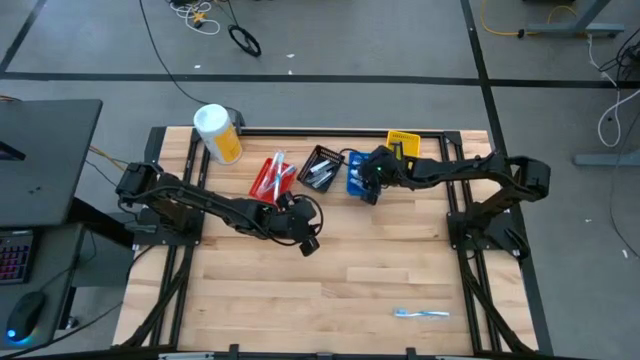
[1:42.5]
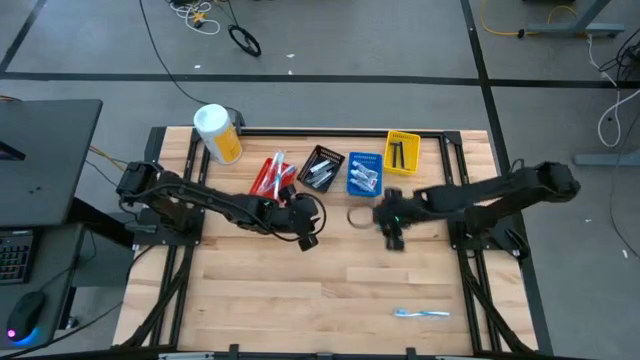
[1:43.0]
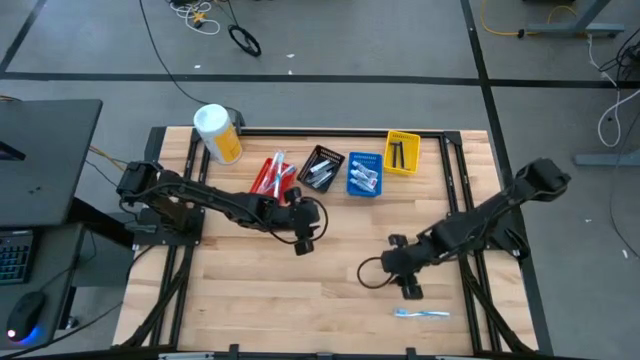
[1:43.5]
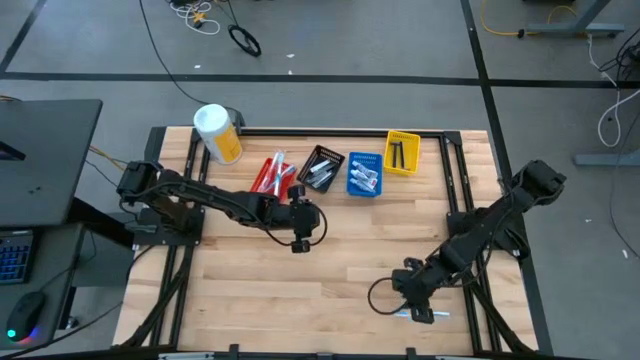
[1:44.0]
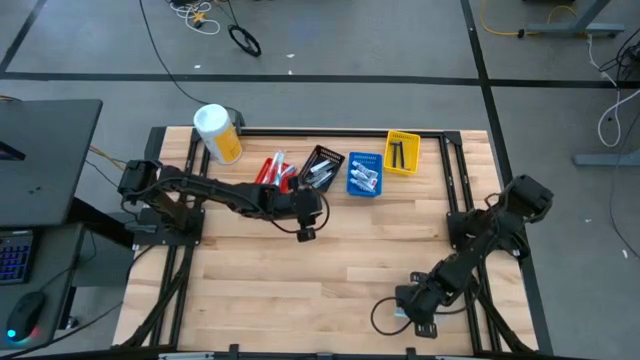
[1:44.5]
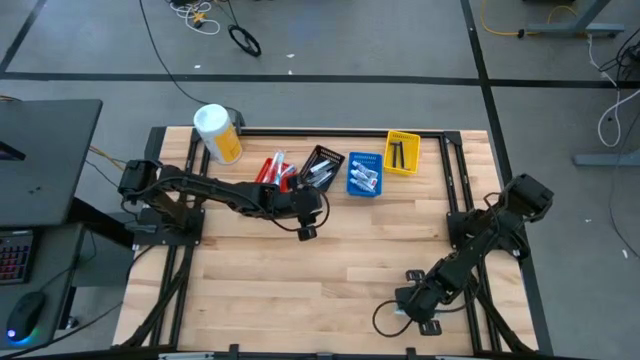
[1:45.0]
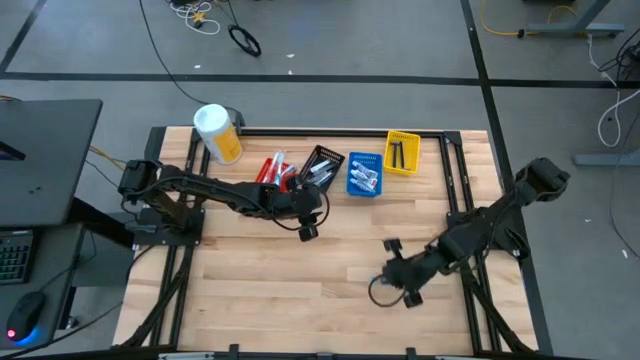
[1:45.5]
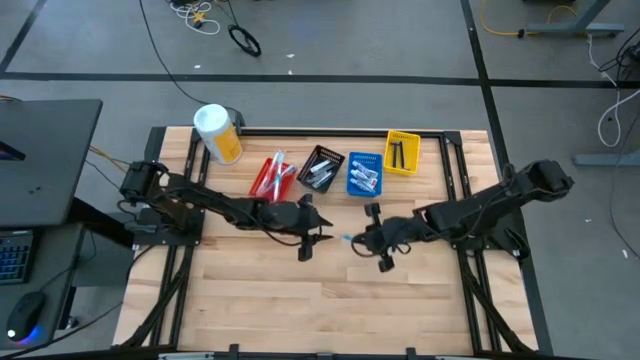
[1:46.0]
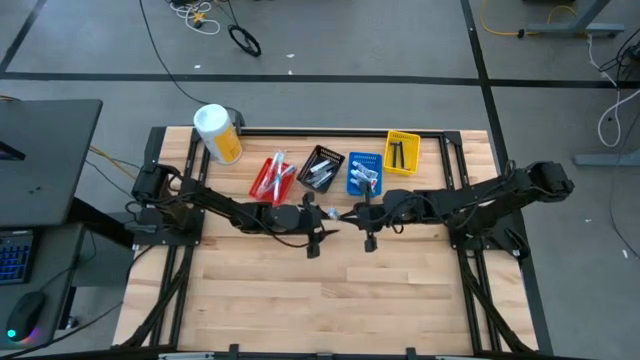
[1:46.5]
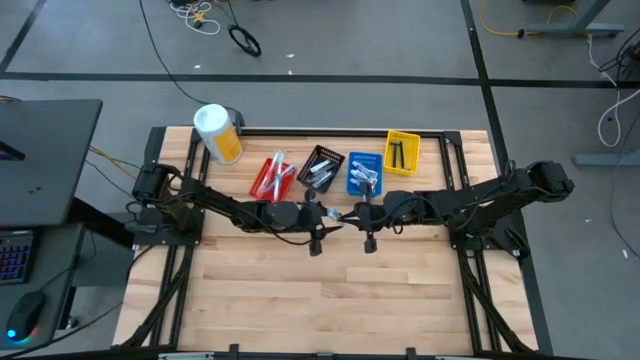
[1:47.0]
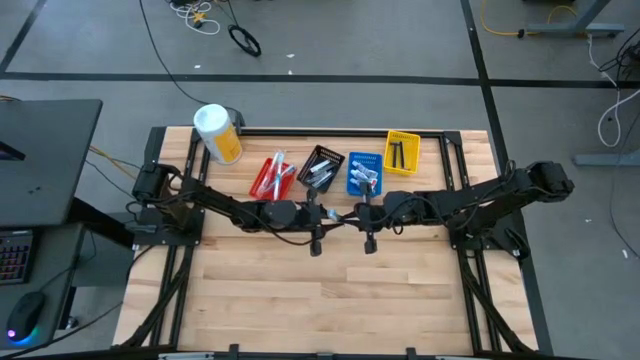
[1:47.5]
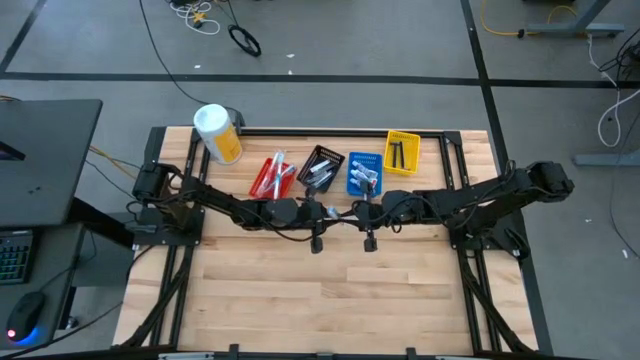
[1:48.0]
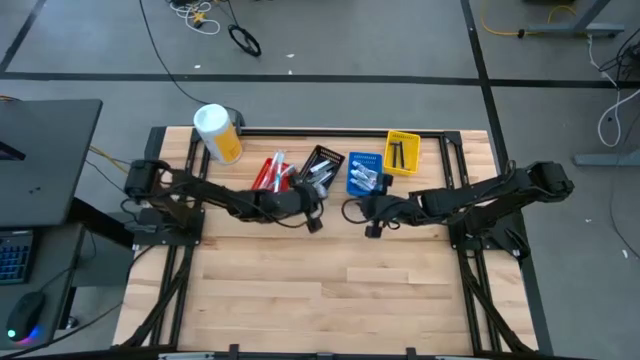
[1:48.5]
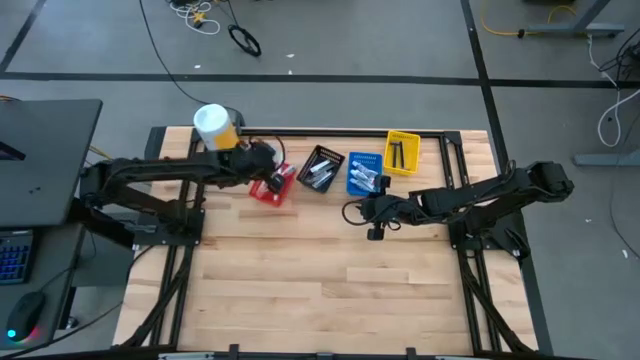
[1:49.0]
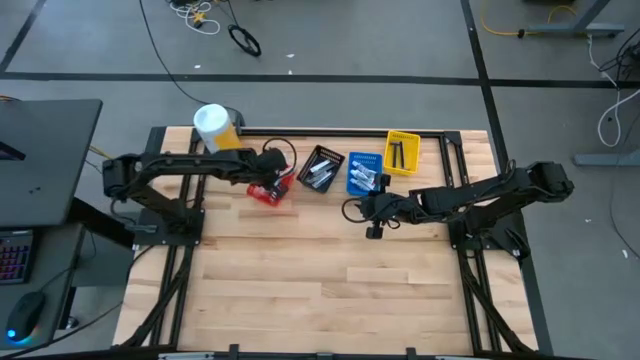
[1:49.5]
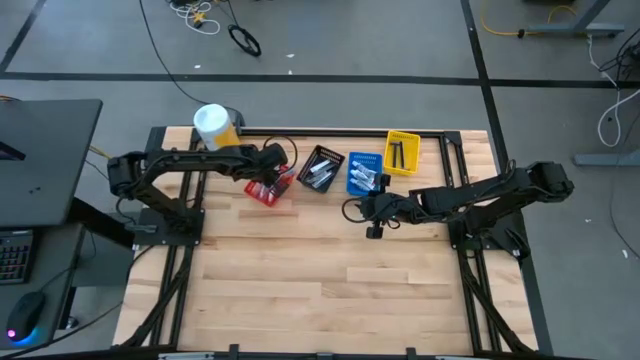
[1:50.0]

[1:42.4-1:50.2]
Task: Pick & Place Travel size toiletries
Put the blue toothbrush into the red bin

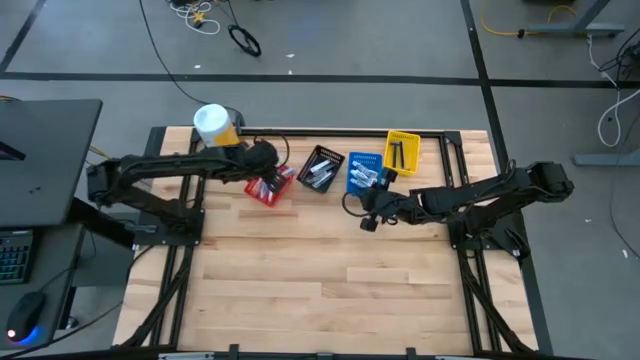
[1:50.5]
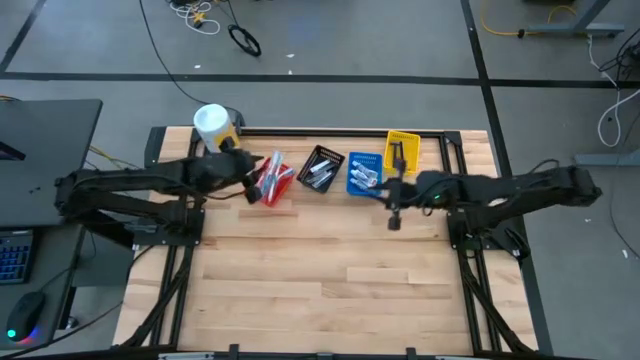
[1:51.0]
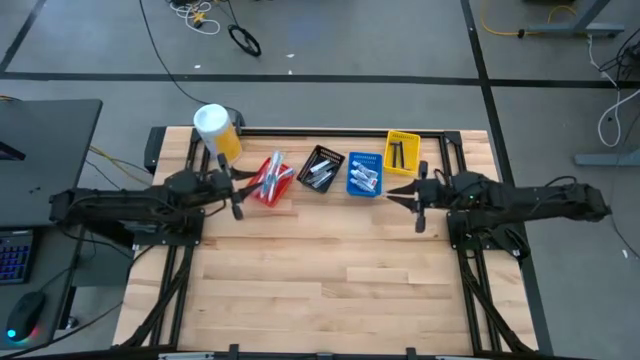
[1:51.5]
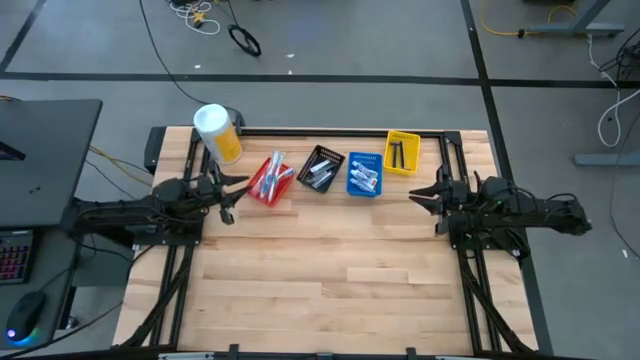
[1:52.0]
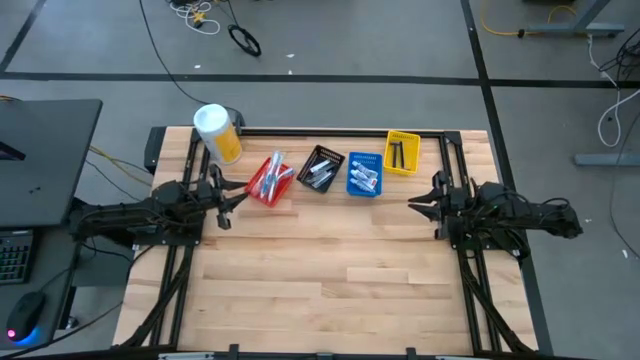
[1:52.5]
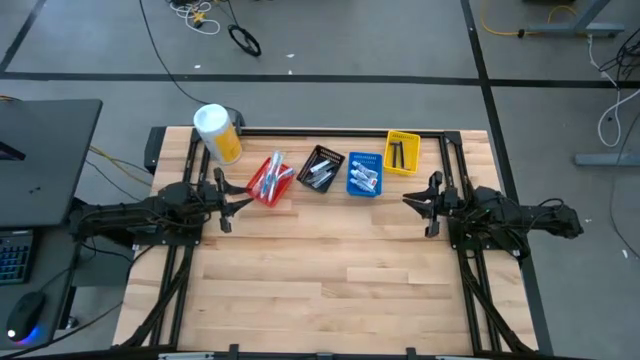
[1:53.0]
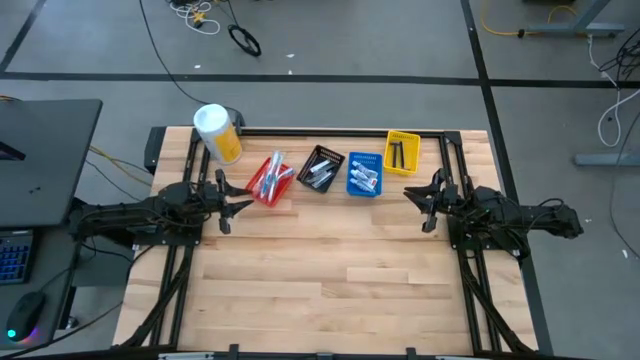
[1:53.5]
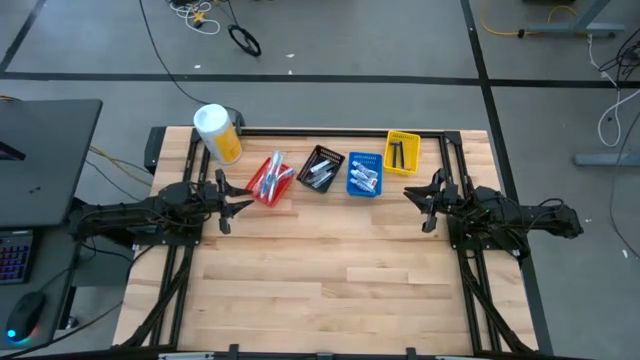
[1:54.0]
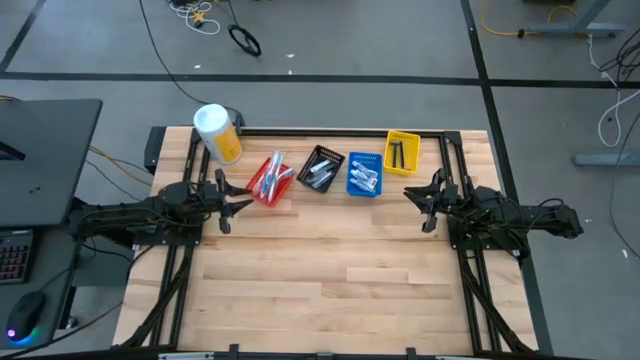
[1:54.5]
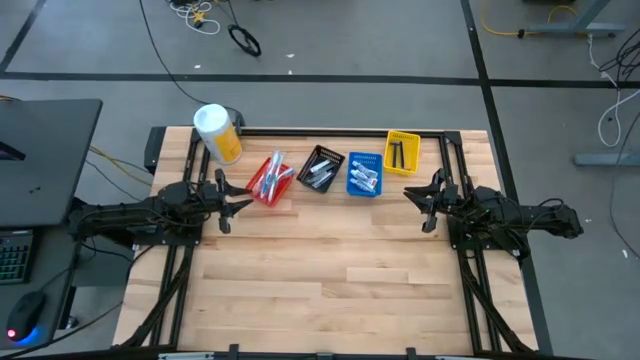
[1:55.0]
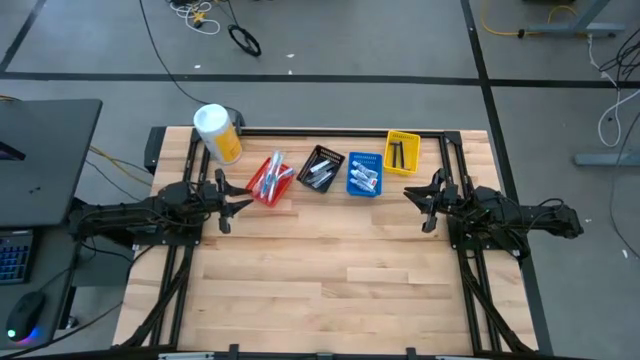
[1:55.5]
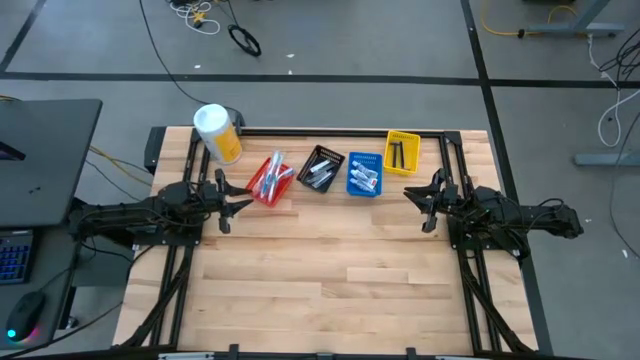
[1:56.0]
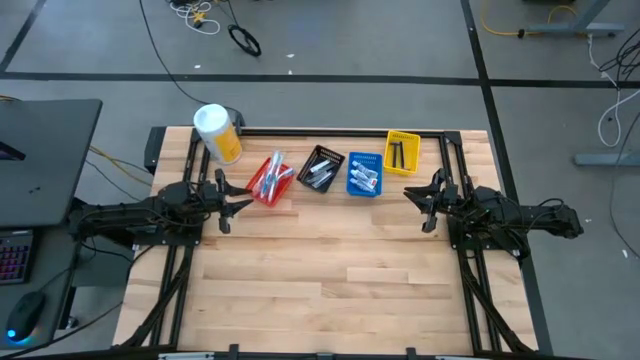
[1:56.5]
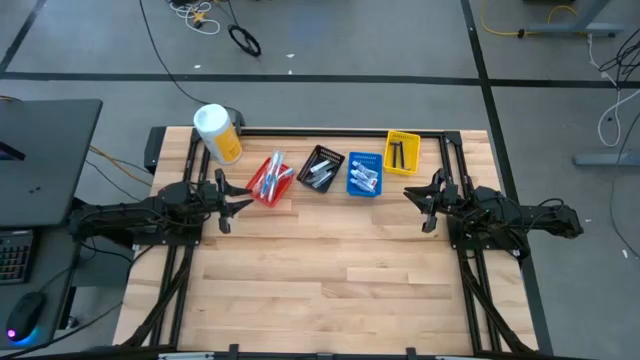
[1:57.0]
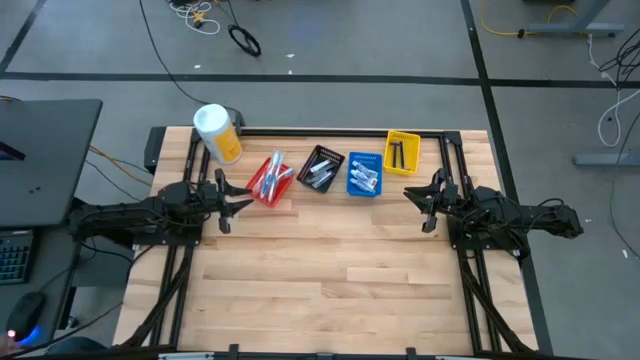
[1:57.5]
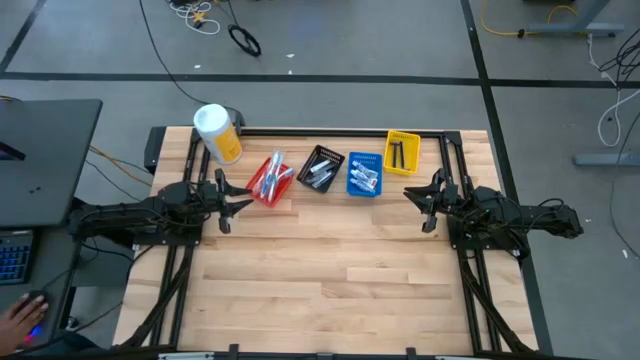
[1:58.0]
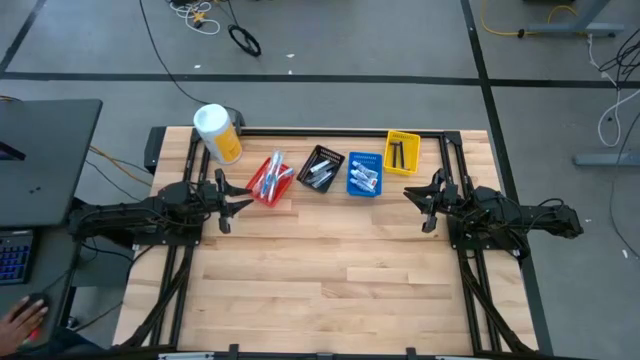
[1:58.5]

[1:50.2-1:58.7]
Return to Home Position

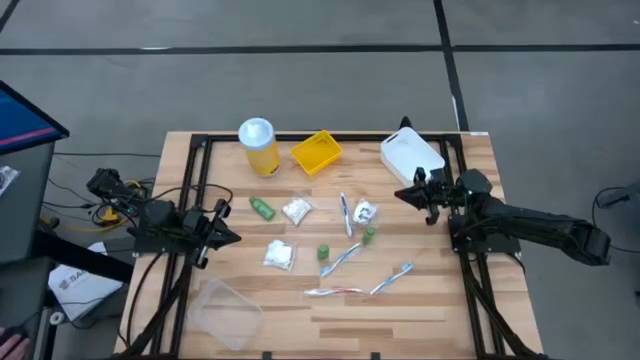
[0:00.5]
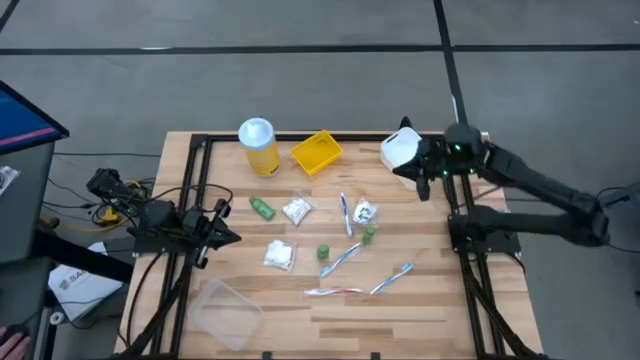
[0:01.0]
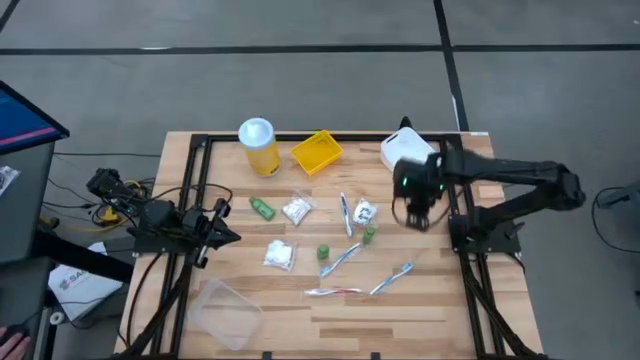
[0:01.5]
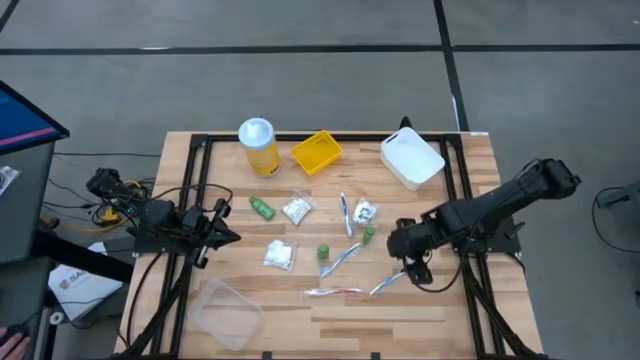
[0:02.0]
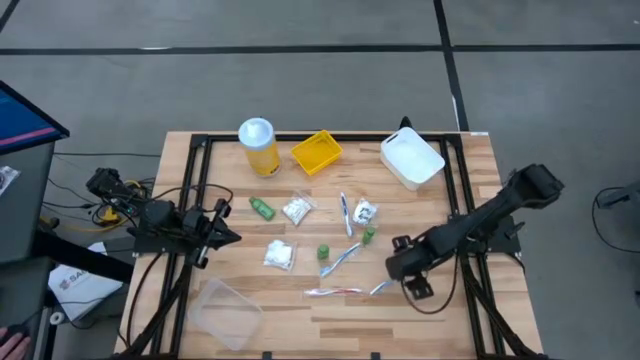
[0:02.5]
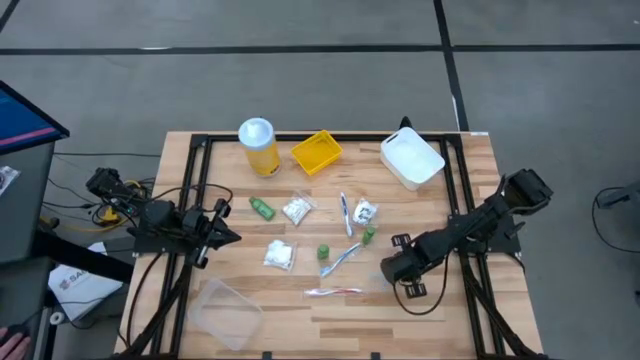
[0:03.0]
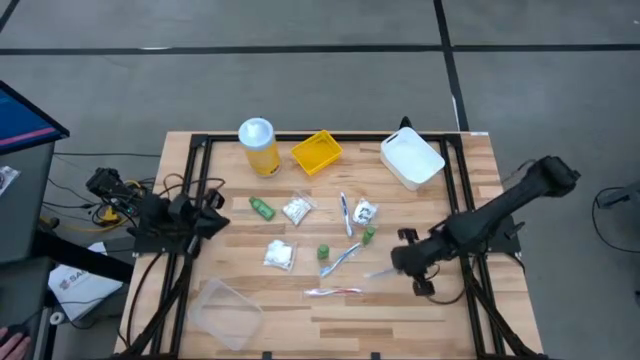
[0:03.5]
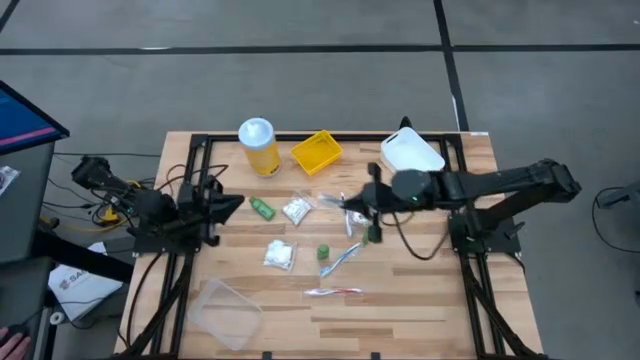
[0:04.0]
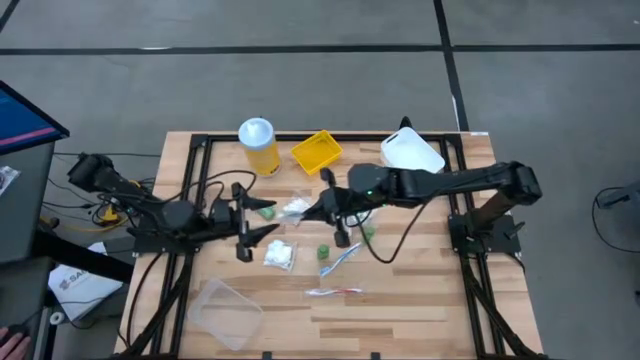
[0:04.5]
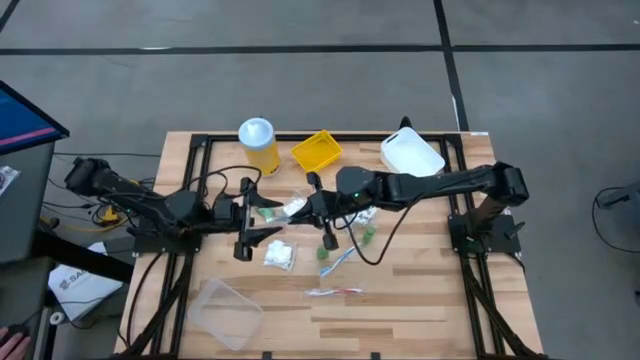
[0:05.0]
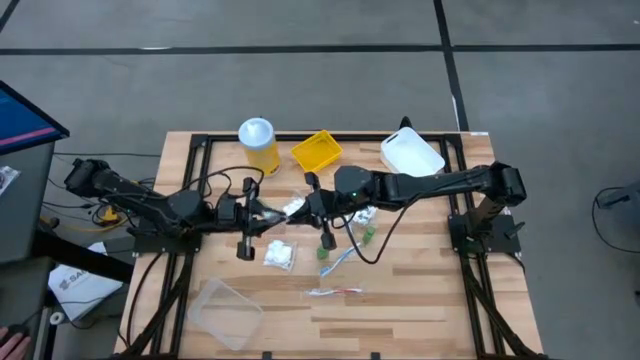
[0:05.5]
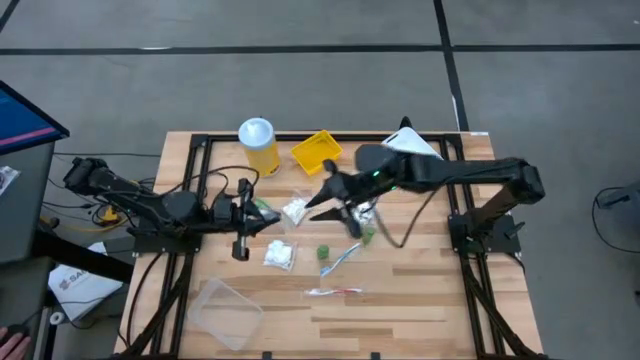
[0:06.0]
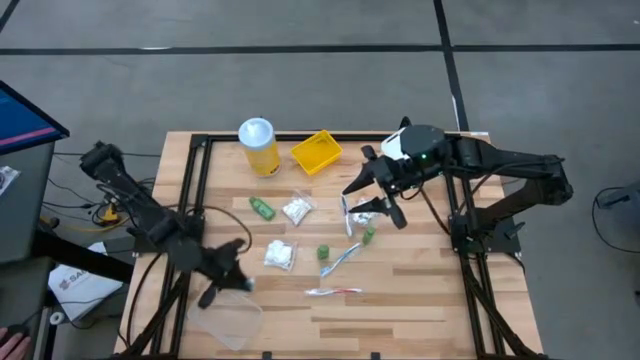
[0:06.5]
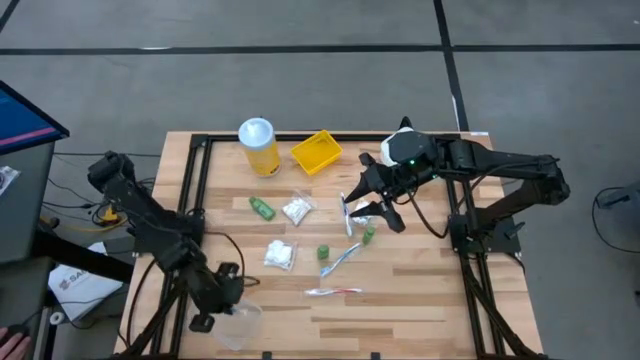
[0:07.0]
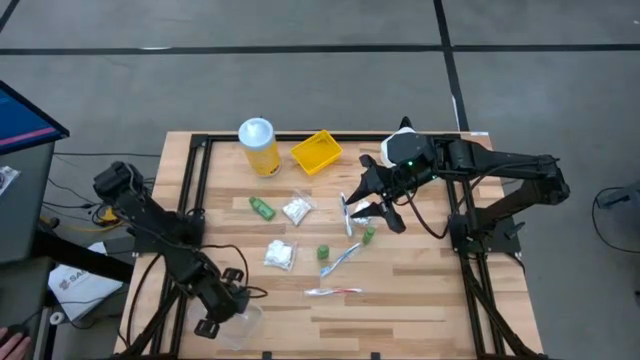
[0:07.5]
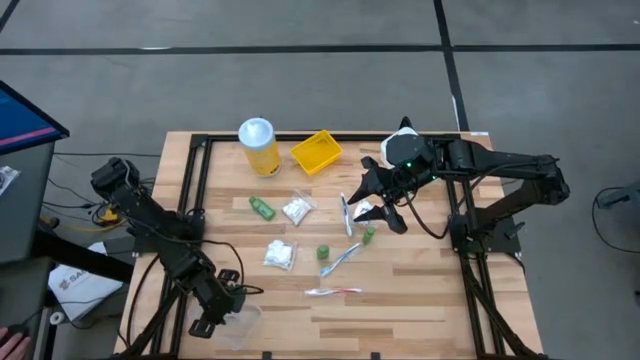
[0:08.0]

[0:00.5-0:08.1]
Task: Pick & Place Travel size toiletries
Put the light blue toothbrush into the transparent bin
